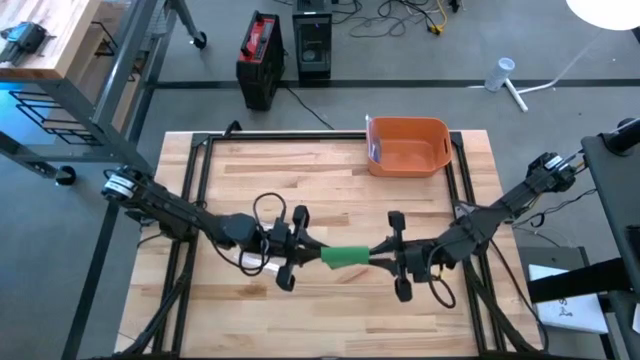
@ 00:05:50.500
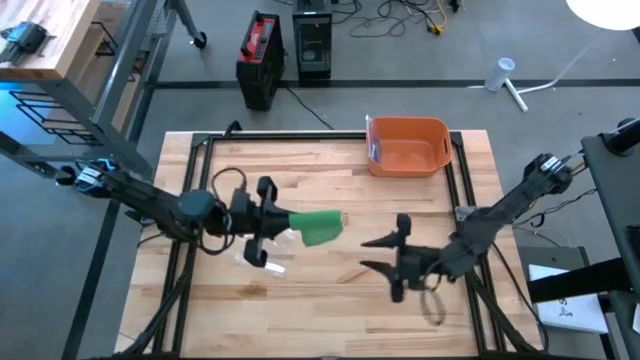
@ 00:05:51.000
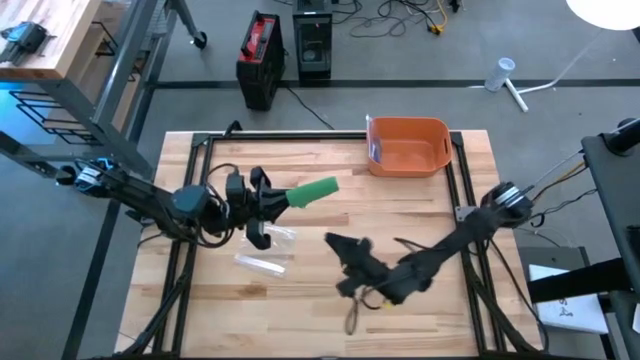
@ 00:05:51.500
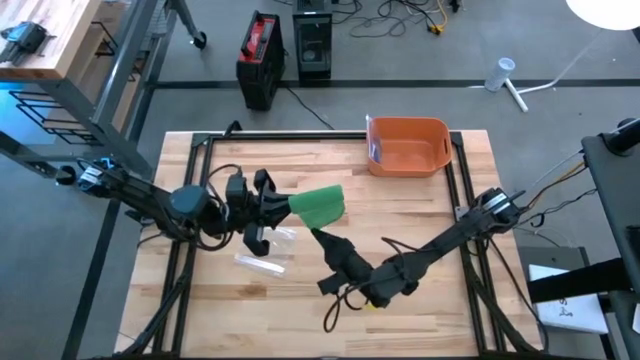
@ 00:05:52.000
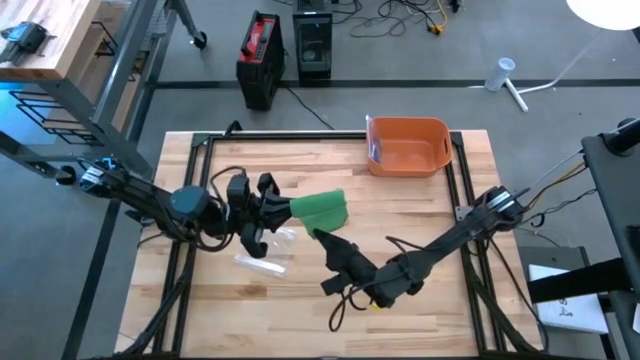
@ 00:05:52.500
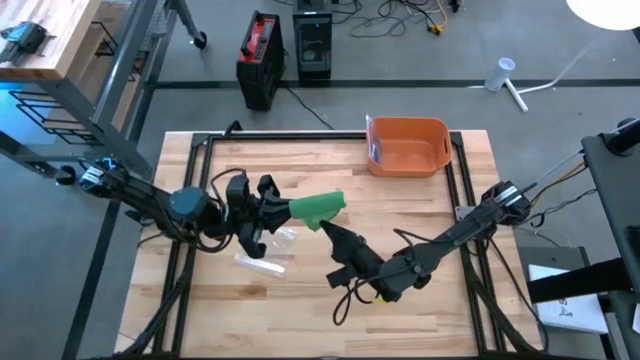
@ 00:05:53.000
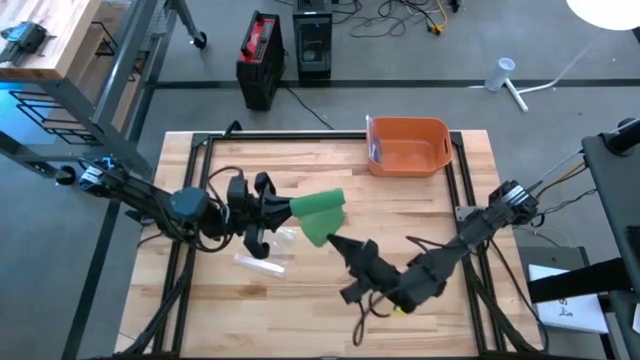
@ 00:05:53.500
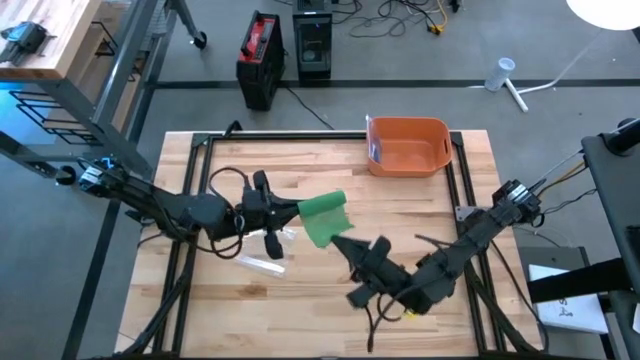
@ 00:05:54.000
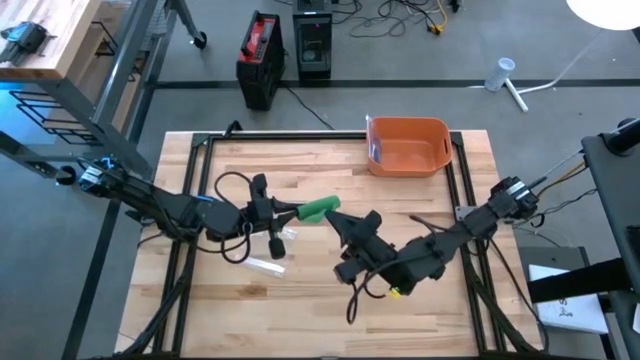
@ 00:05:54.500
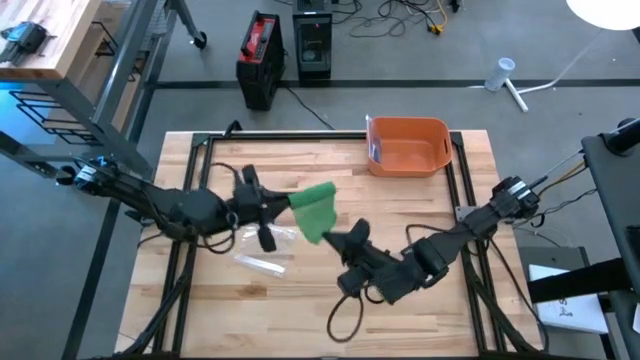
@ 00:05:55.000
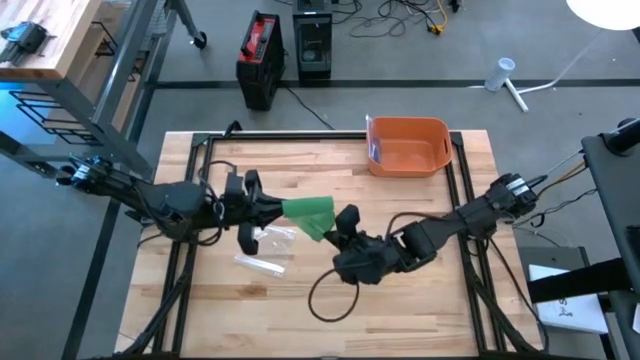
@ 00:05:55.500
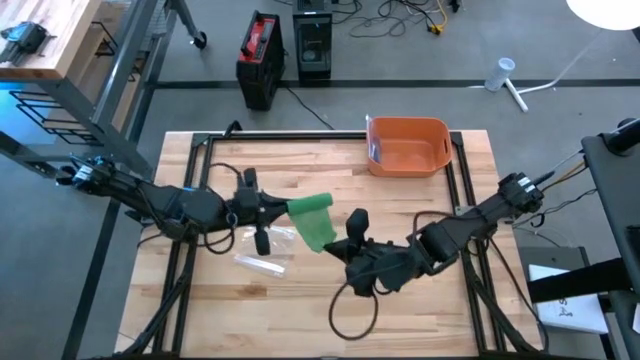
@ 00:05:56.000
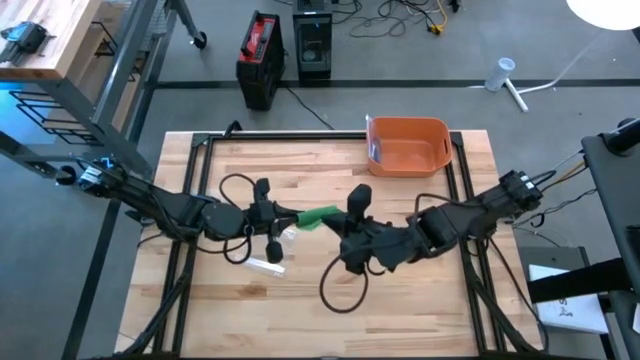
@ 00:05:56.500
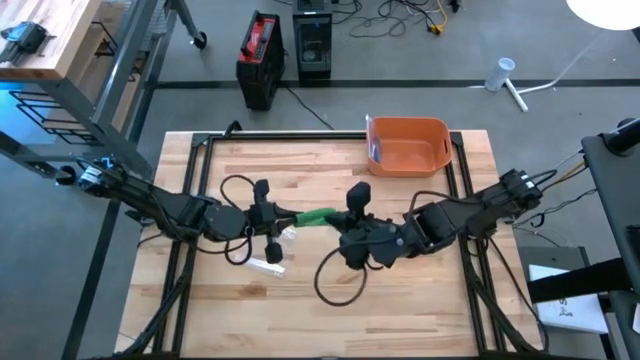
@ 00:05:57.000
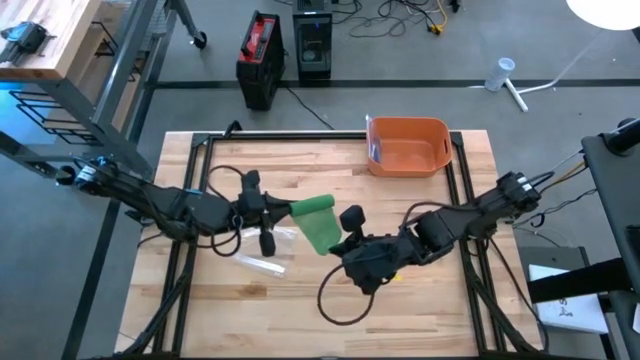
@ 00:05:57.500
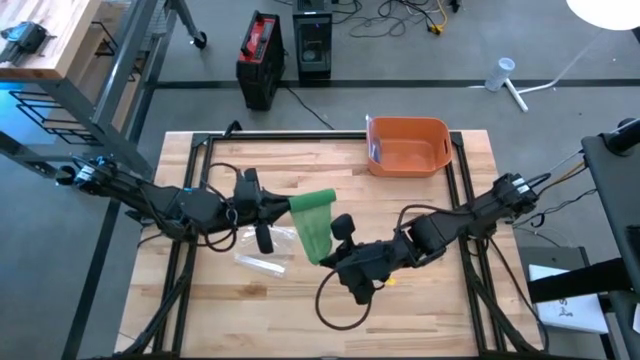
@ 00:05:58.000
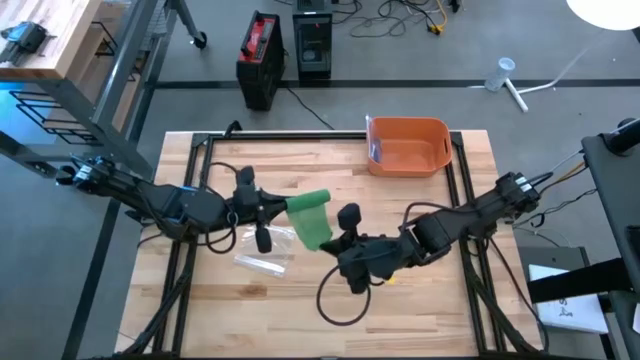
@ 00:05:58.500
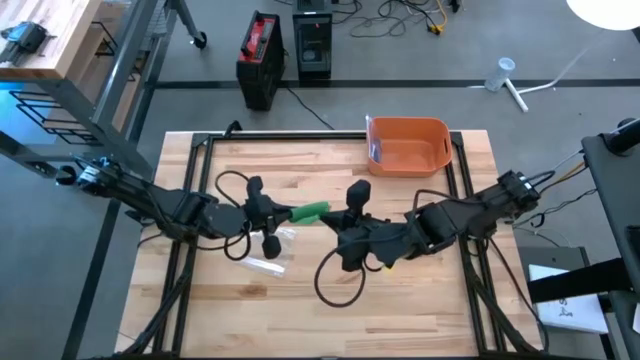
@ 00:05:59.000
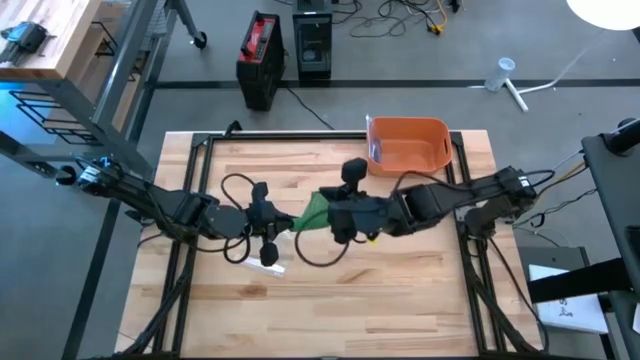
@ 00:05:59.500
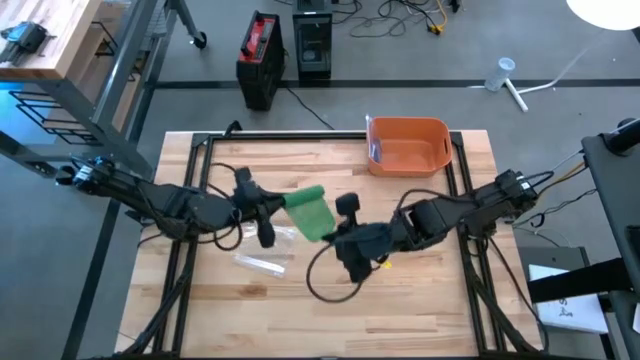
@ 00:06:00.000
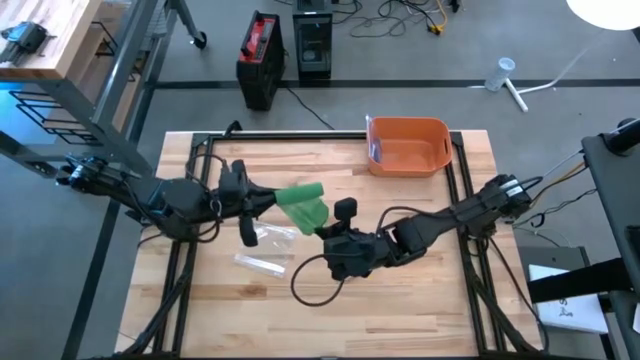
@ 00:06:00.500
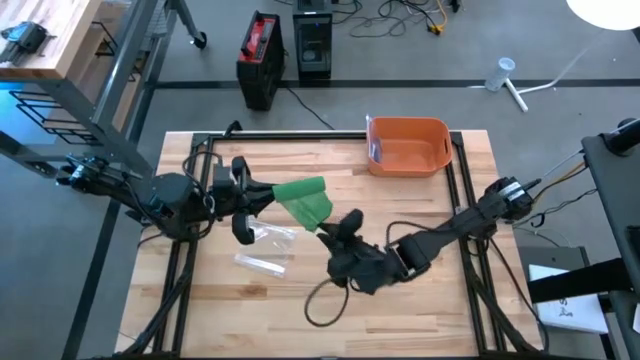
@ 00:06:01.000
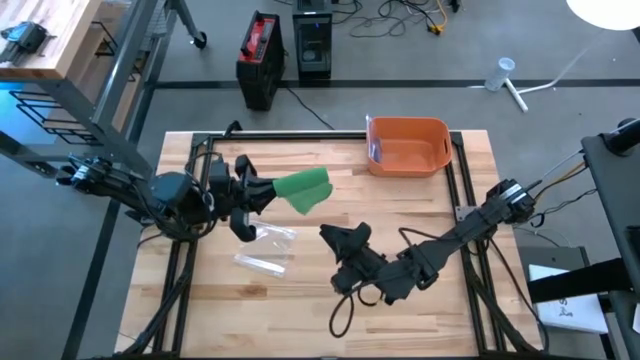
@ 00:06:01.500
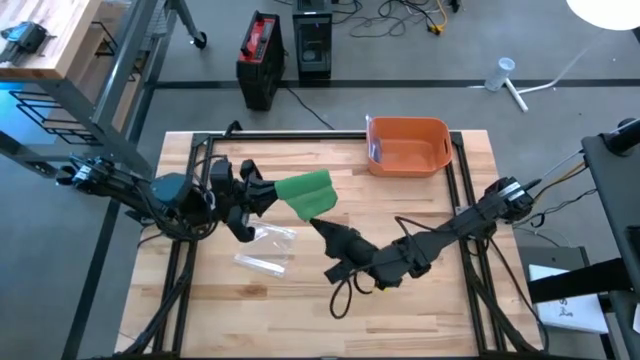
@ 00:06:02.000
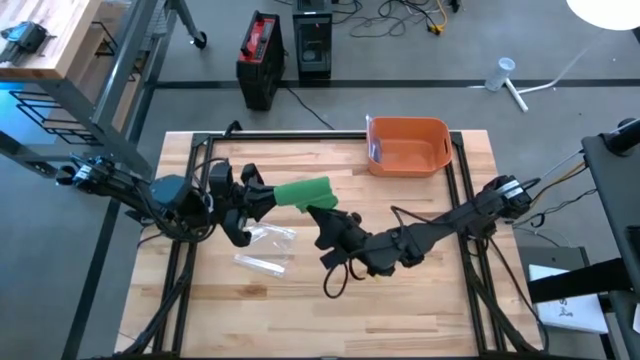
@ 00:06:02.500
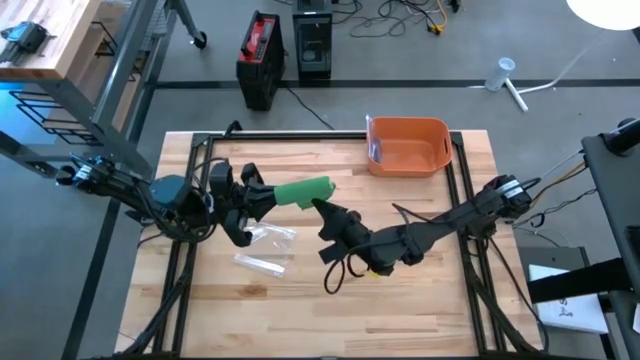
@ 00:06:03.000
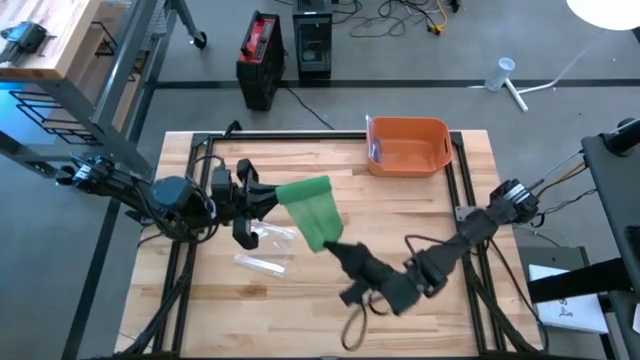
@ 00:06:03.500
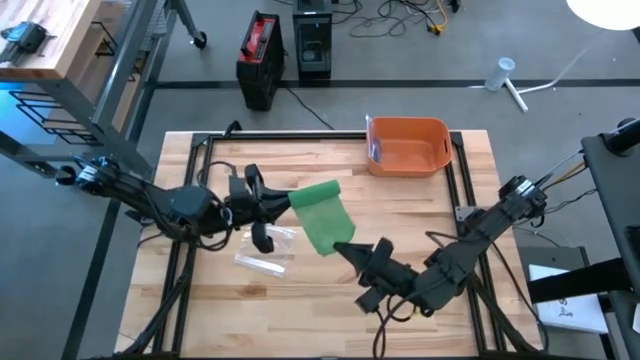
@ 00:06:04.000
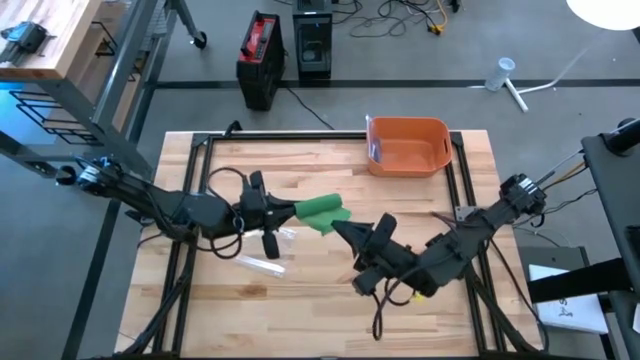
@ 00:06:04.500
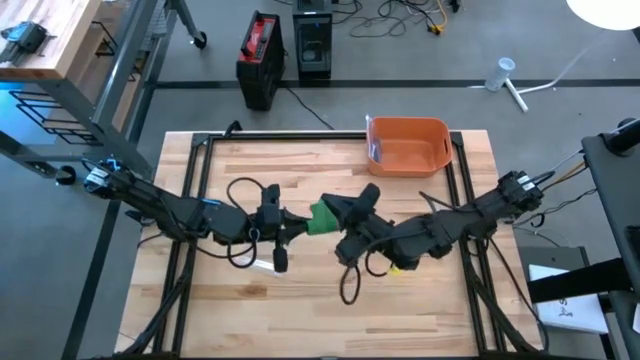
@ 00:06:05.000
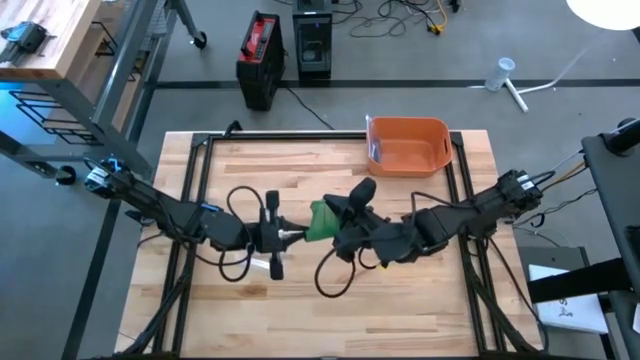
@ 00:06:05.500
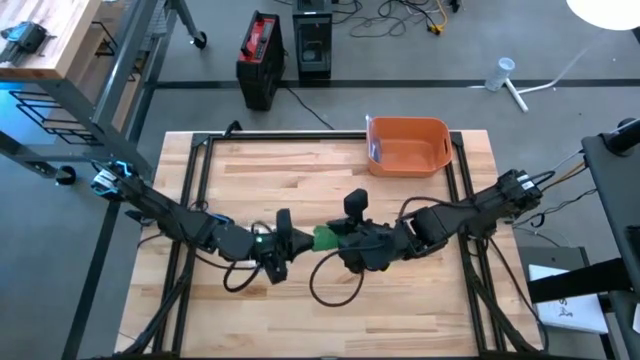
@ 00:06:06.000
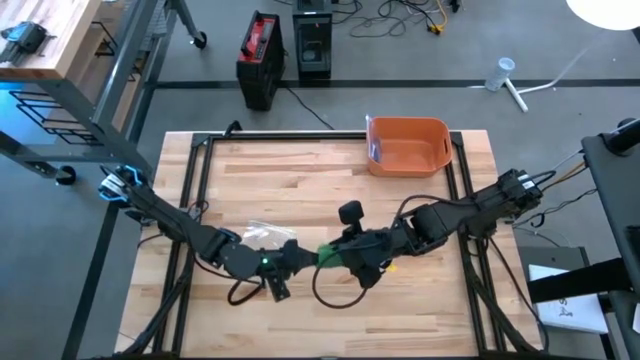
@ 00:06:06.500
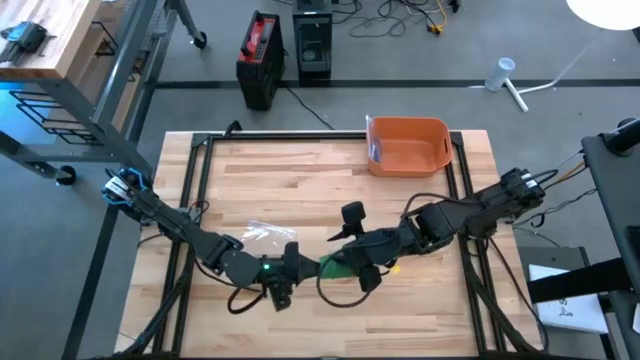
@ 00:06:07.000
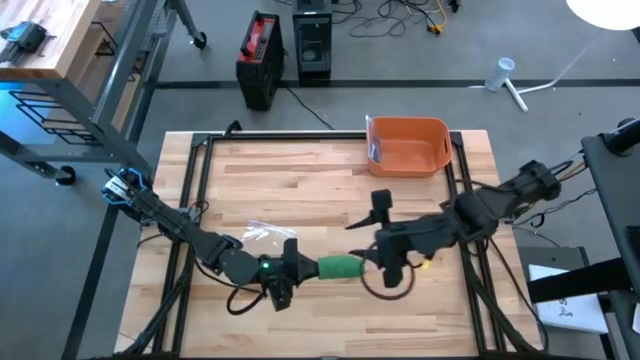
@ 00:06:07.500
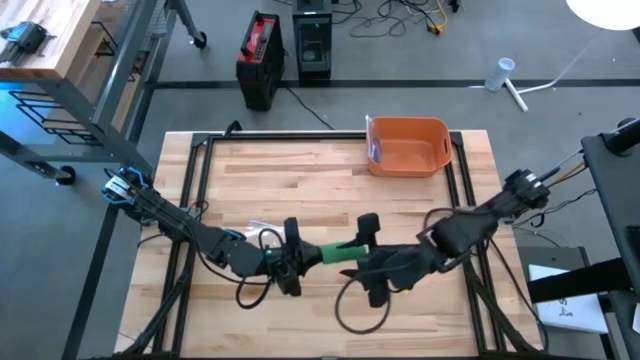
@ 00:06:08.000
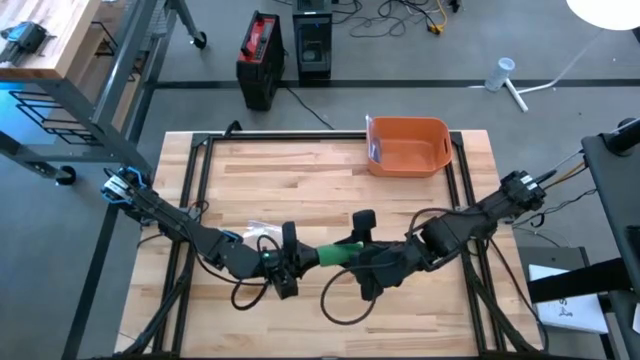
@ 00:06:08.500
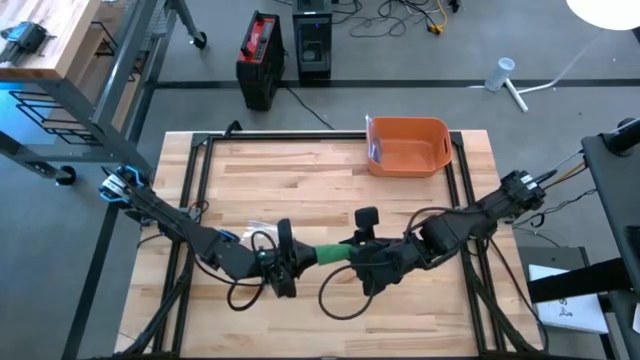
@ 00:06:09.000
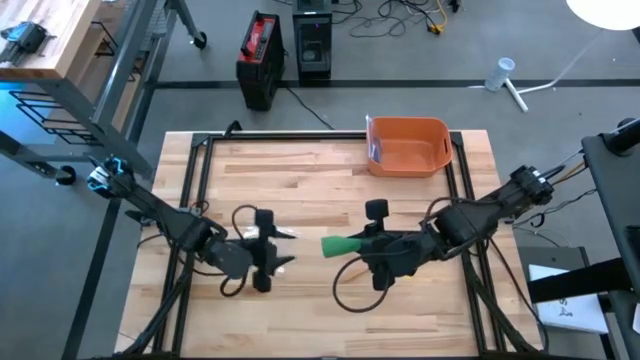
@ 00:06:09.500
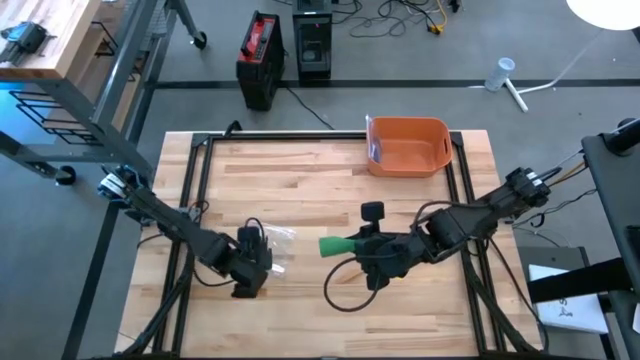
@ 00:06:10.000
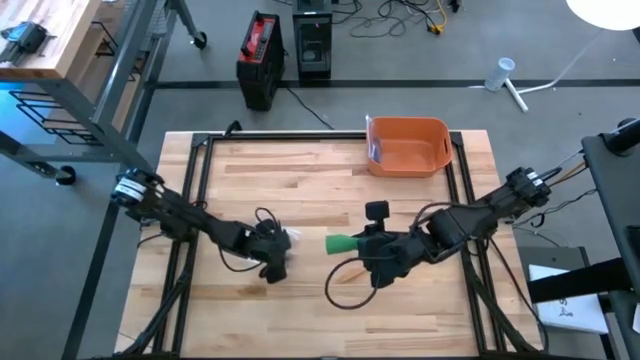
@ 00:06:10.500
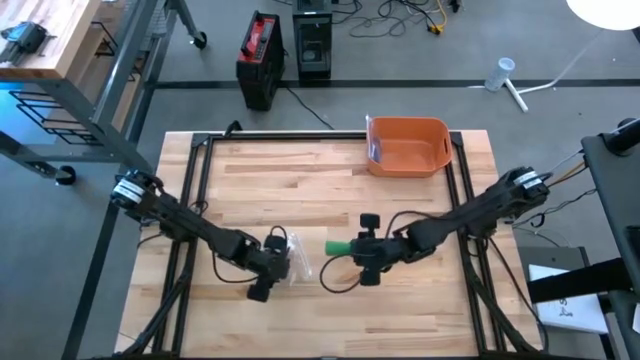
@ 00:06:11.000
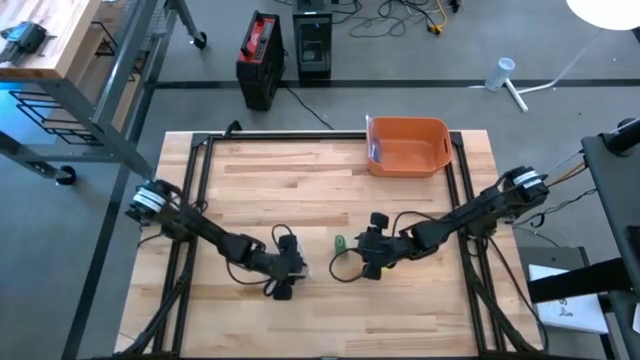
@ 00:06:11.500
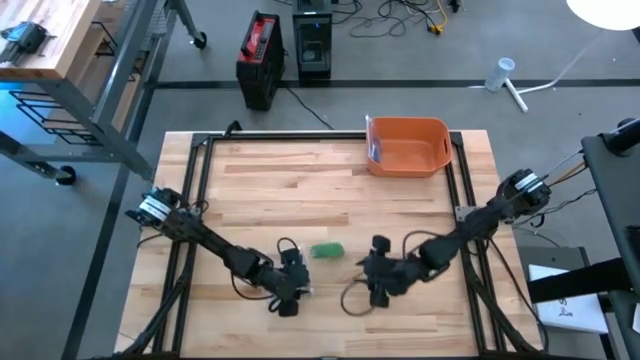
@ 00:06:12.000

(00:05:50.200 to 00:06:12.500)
Task: Roll bandage
Roll the green bandage
